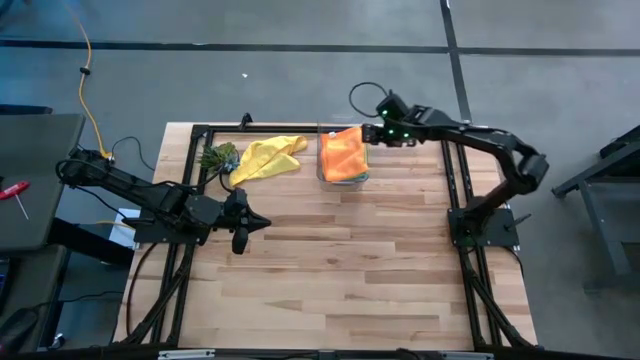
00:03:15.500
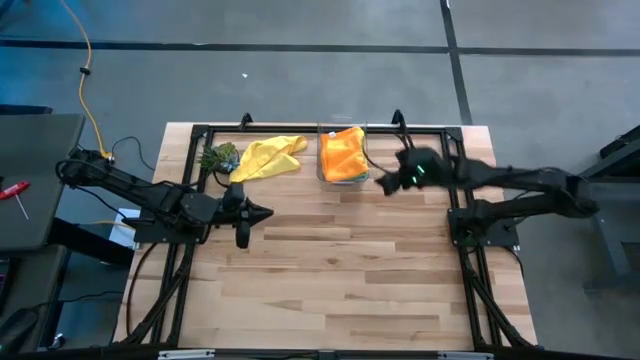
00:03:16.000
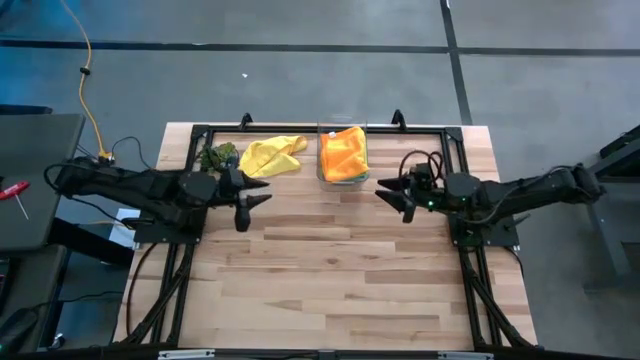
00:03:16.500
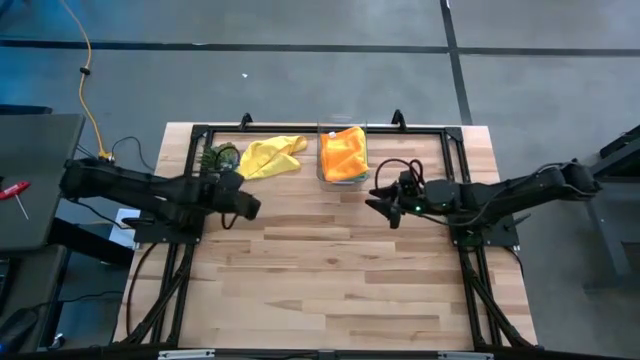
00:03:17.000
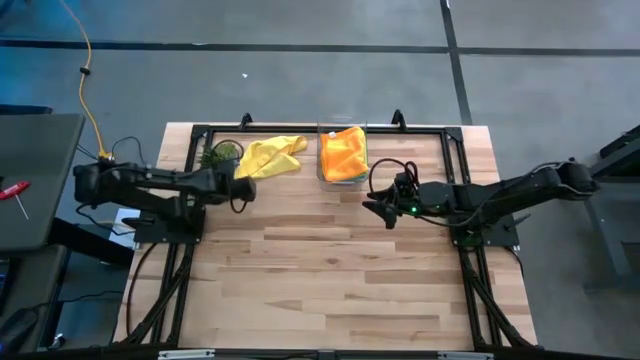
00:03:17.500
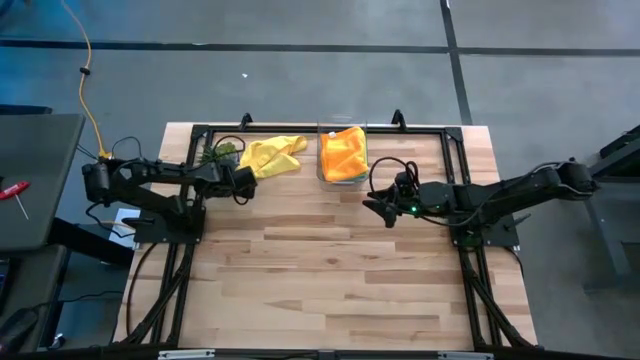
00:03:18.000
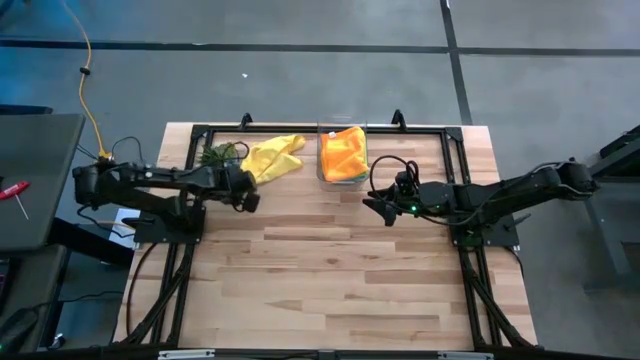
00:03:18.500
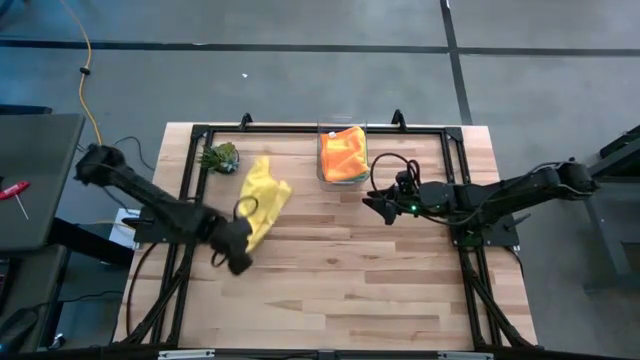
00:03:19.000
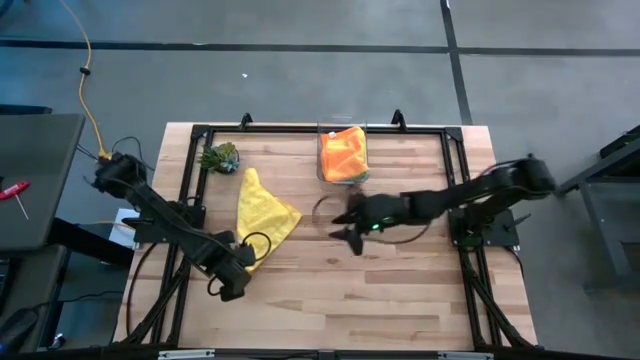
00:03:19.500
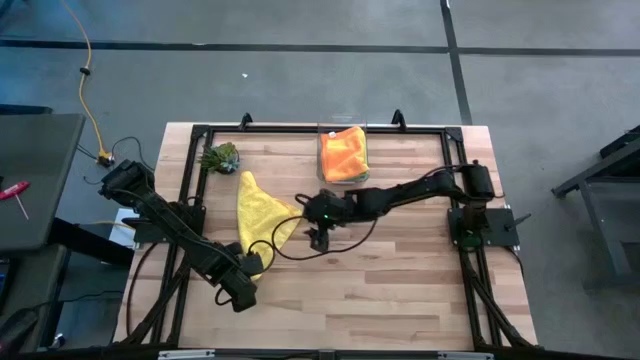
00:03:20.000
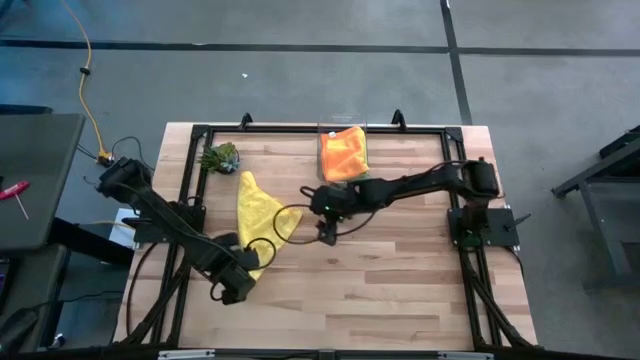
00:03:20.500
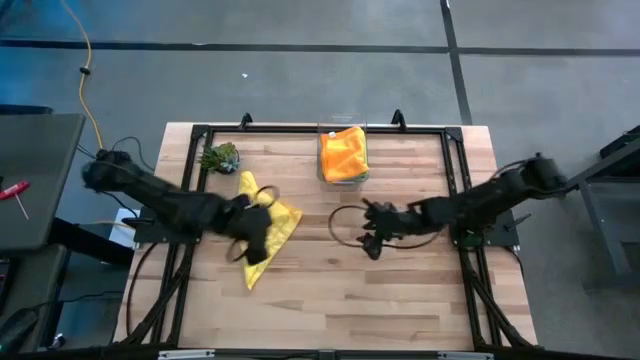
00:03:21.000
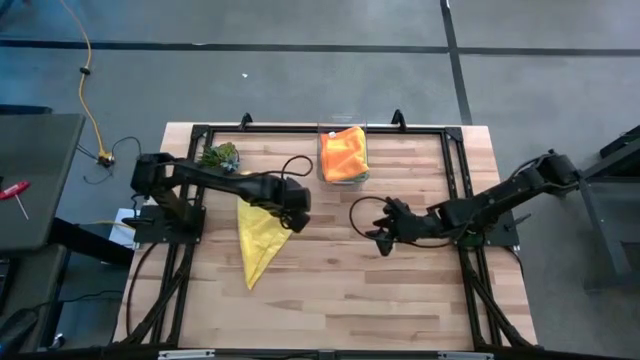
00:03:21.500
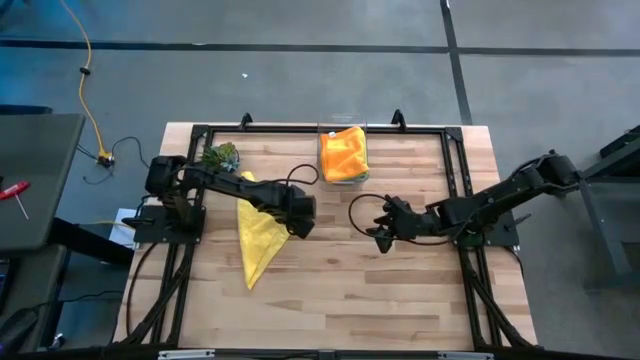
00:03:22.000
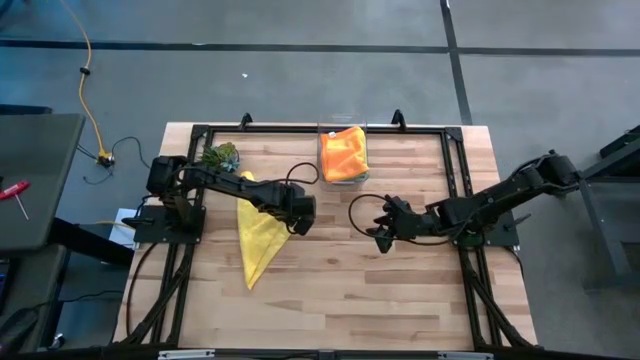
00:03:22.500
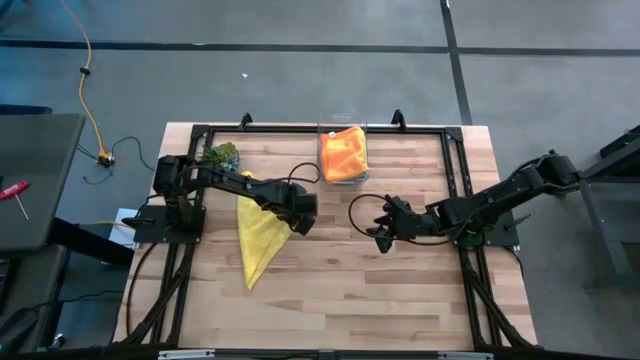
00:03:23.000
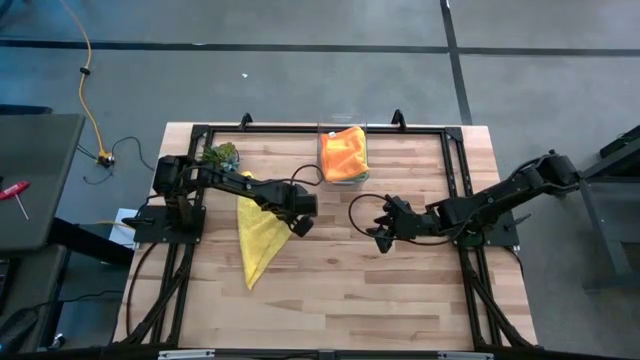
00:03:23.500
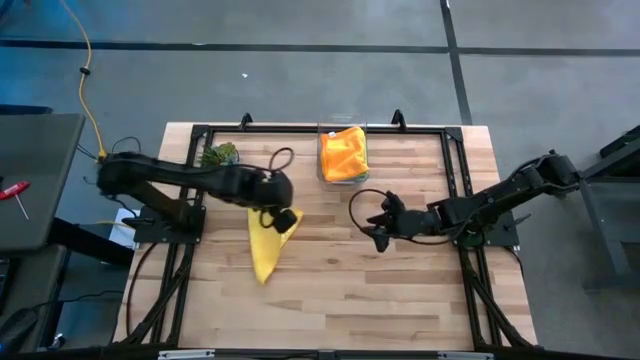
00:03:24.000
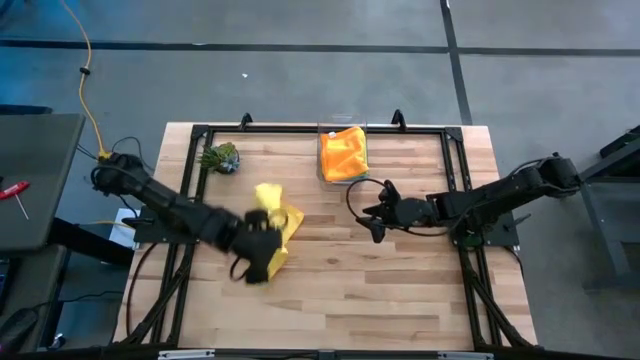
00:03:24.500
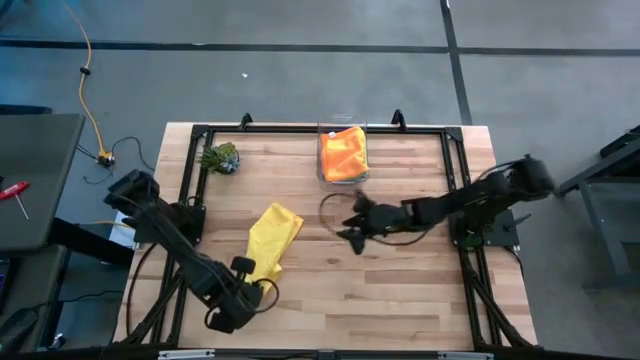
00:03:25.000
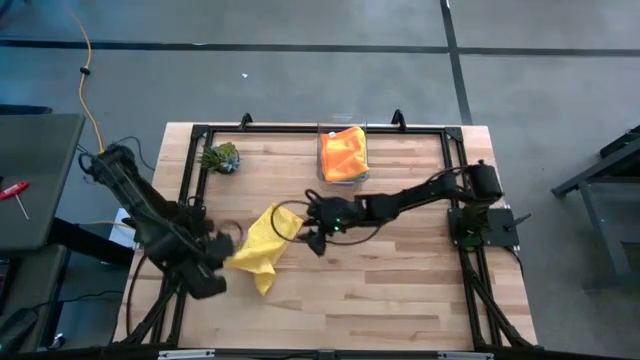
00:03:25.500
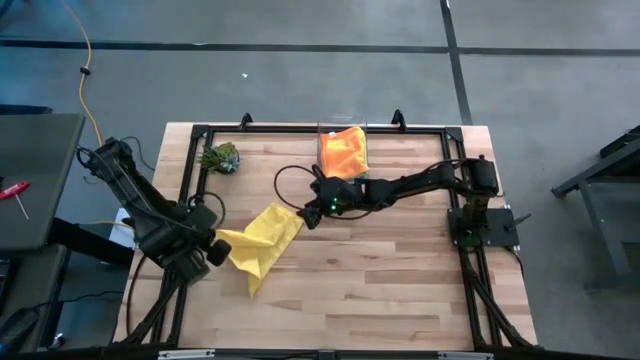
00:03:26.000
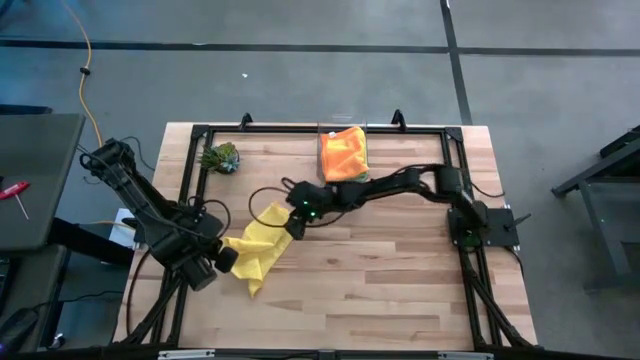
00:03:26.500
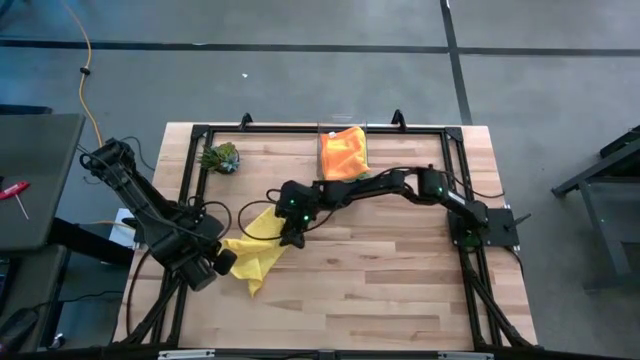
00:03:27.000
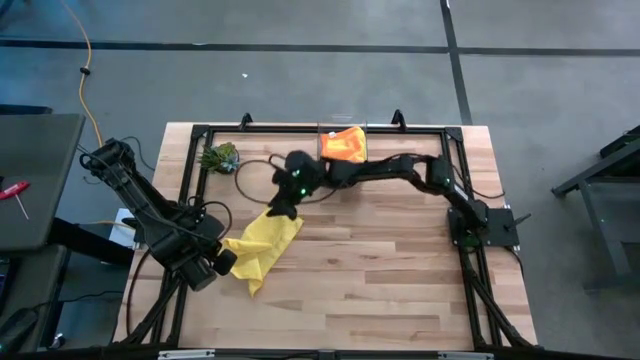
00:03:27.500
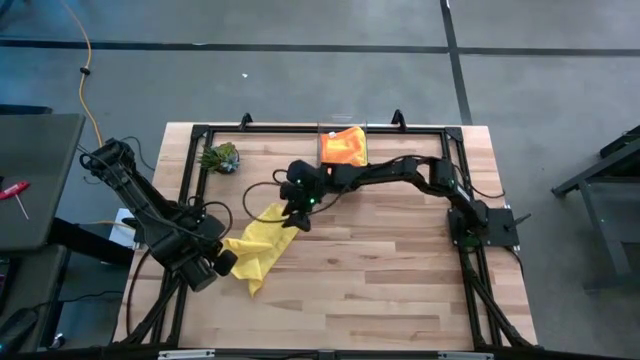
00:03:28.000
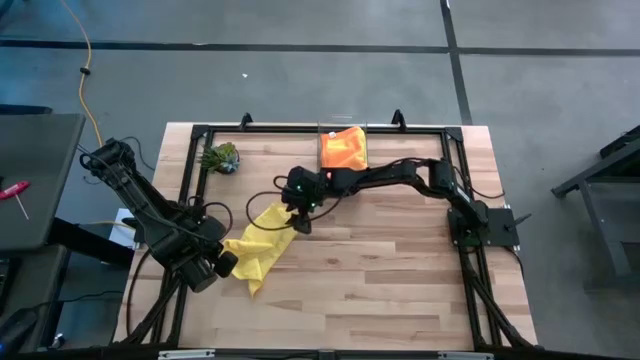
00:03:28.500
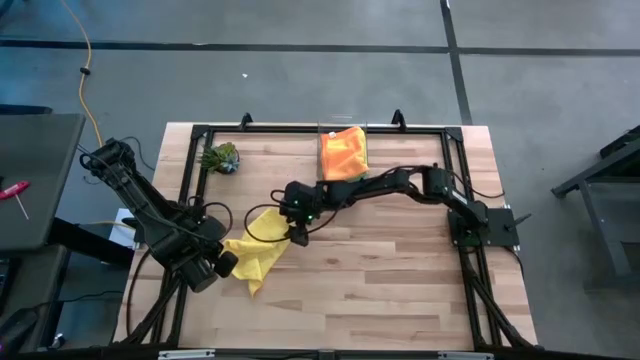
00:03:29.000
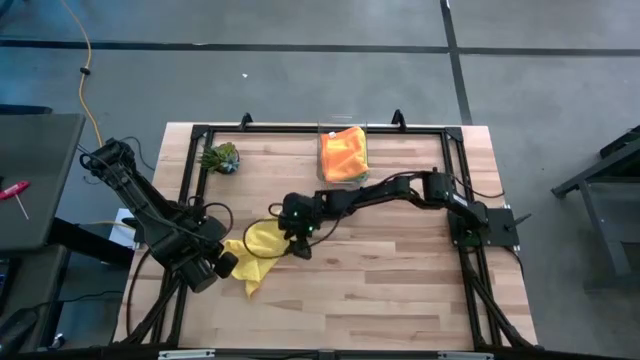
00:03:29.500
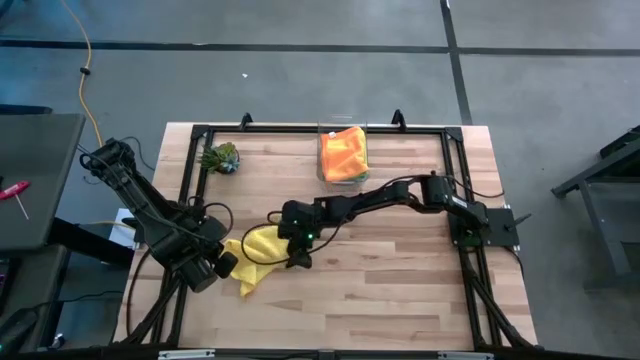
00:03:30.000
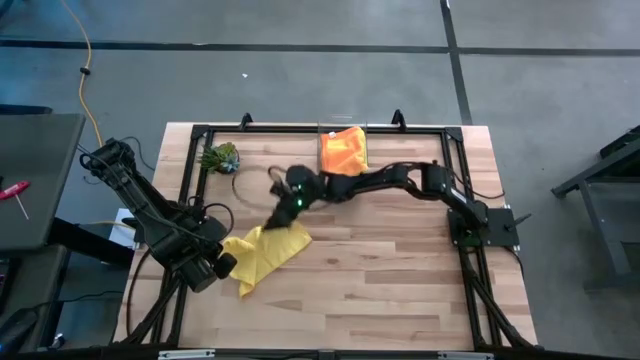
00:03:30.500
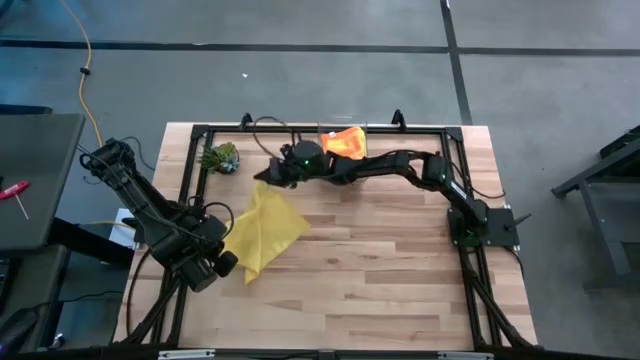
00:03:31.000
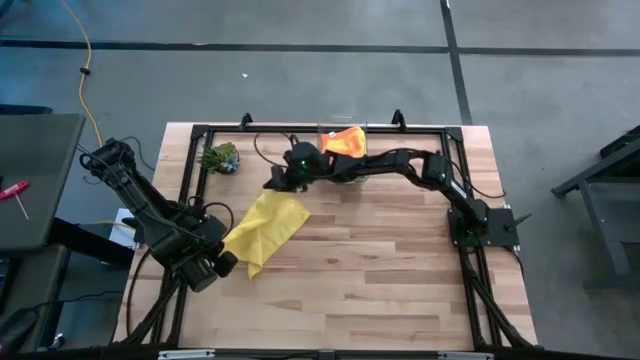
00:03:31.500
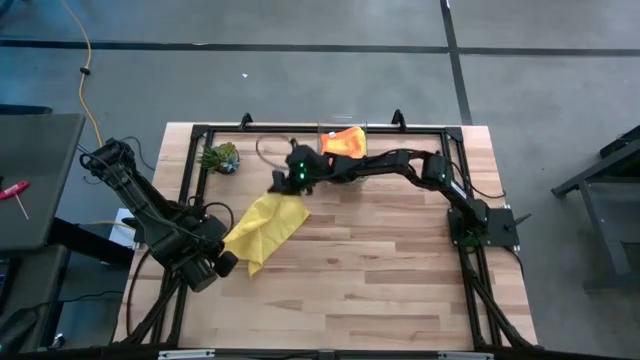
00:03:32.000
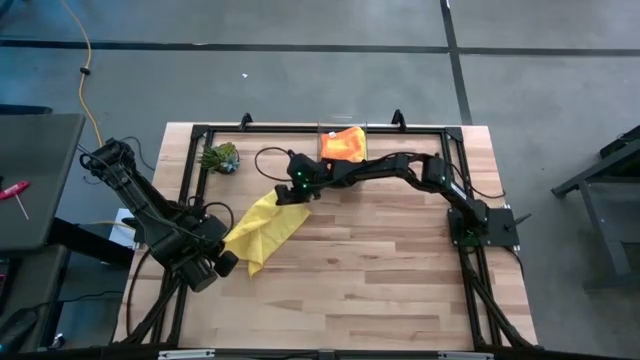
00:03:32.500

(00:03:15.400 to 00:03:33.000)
Task: Fold microfiber towels
Fold the yellow microfiber cloth

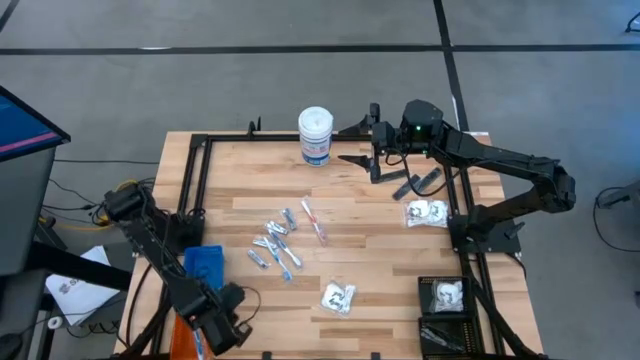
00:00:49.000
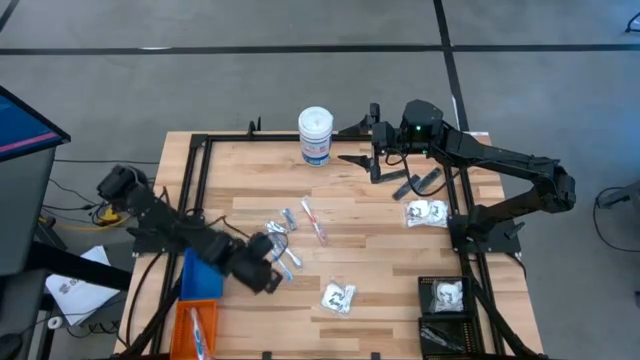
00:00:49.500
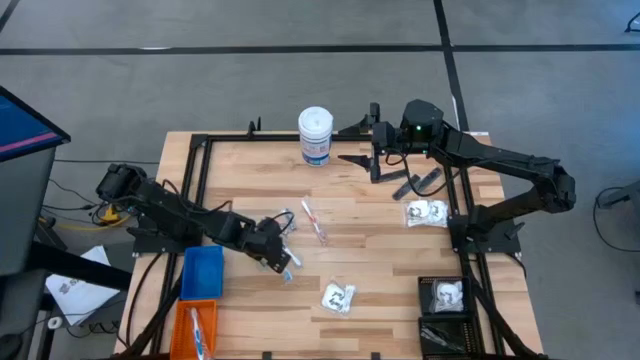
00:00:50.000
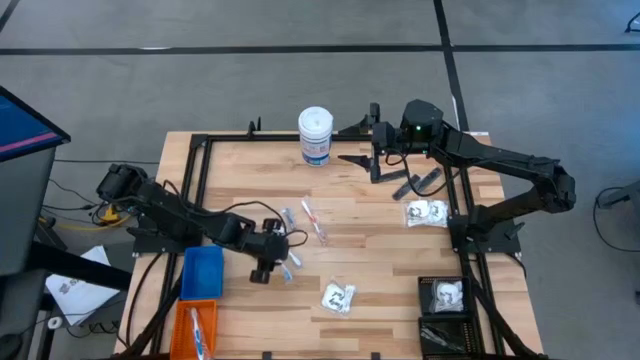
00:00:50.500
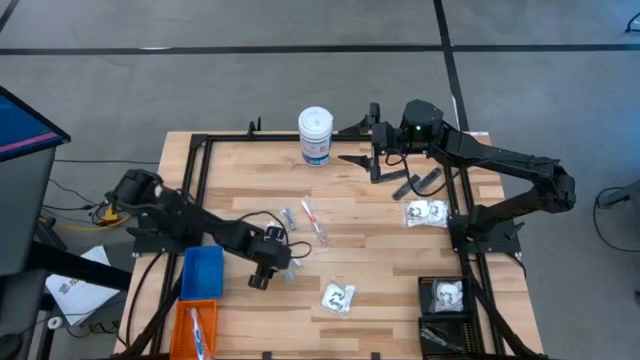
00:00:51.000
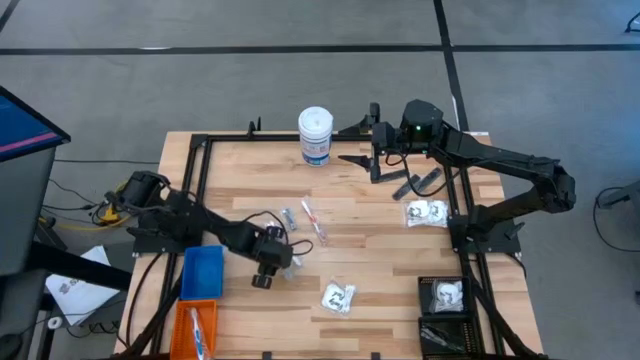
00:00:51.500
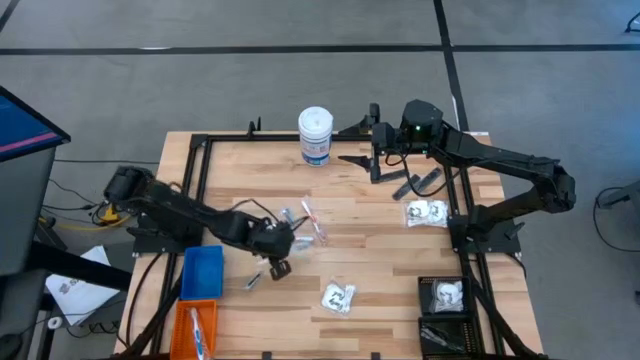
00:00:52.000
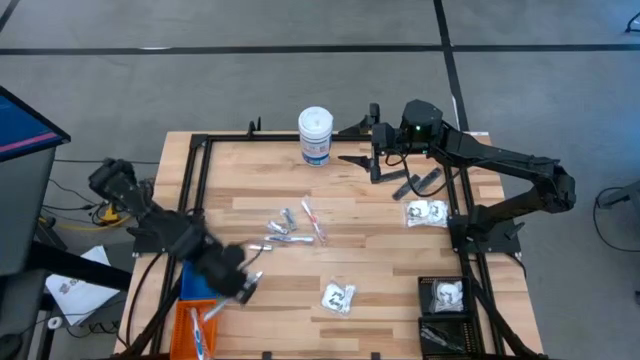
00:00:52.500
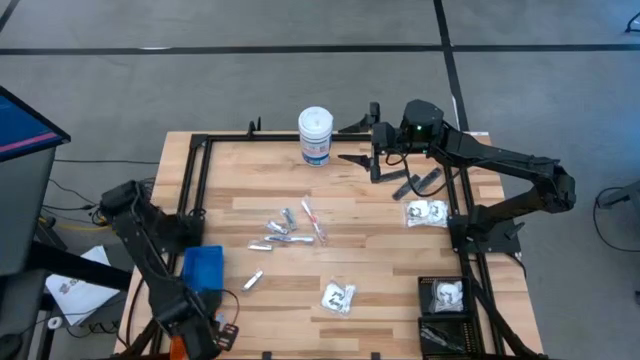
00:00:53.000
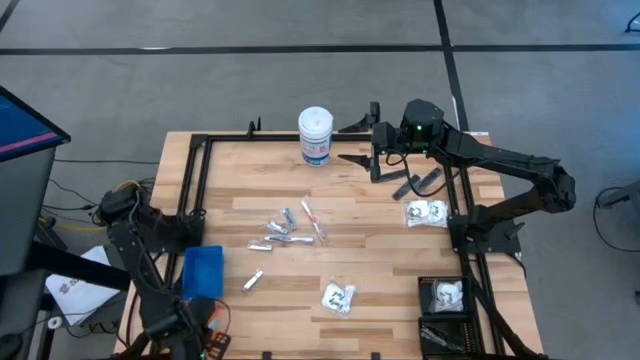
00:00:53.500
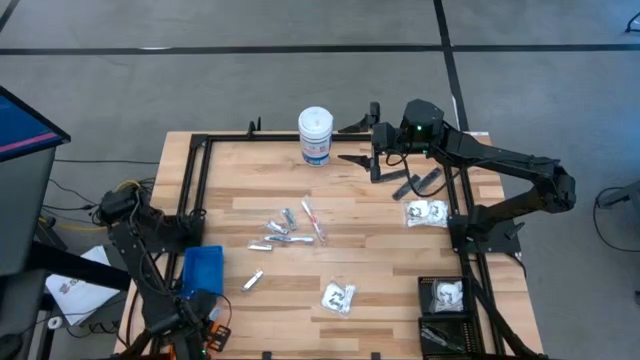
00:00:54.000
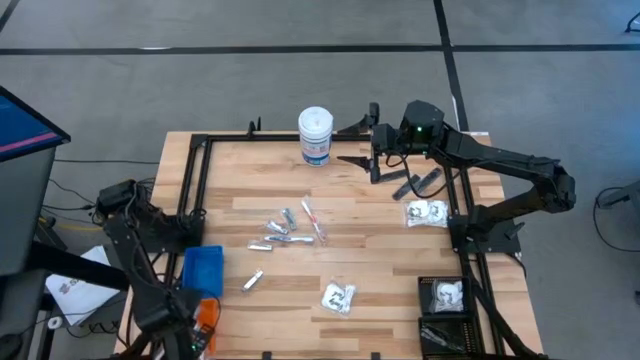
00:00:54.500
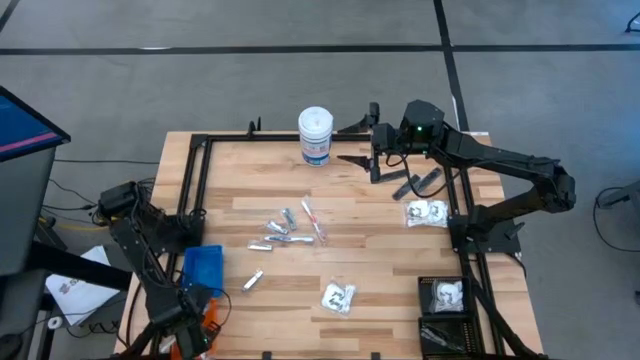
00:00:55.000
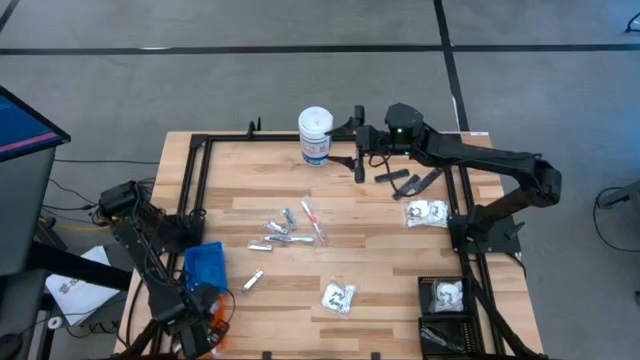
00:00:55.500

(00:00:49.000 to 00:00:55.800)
Task: Pick & Place Travel size toiletries
Put the blue toothbrush into the orange bin
